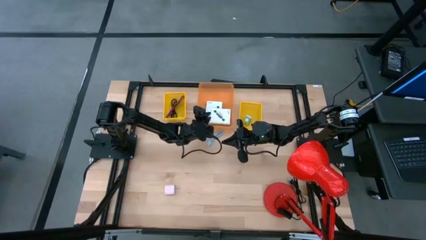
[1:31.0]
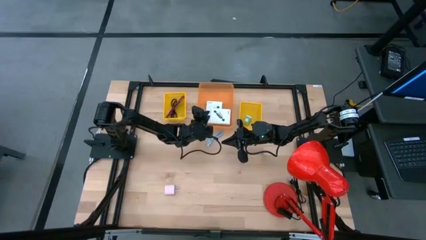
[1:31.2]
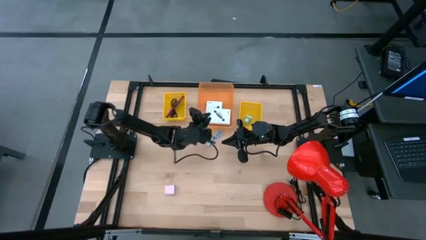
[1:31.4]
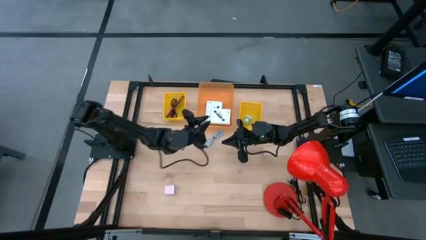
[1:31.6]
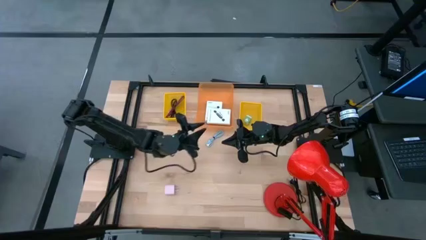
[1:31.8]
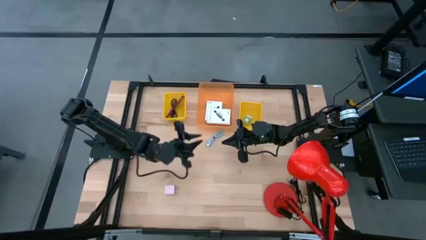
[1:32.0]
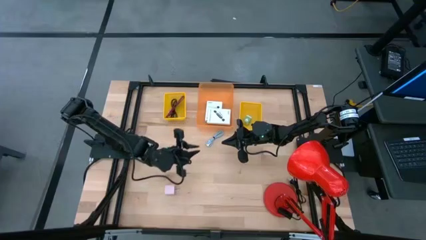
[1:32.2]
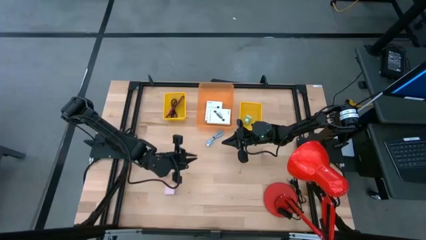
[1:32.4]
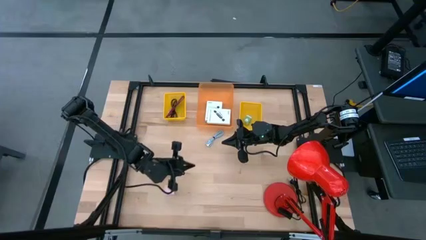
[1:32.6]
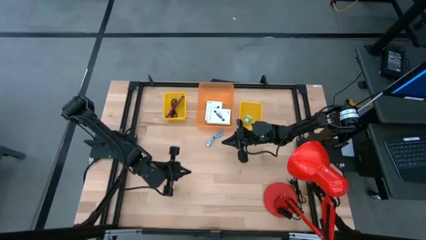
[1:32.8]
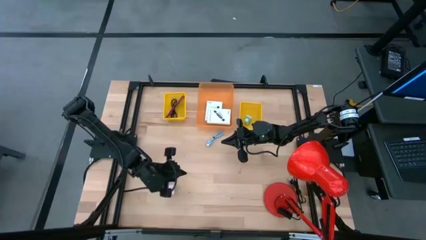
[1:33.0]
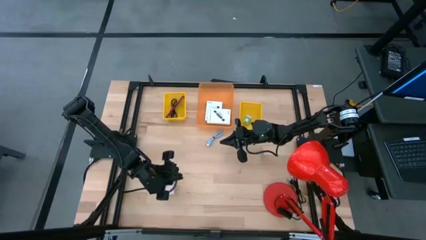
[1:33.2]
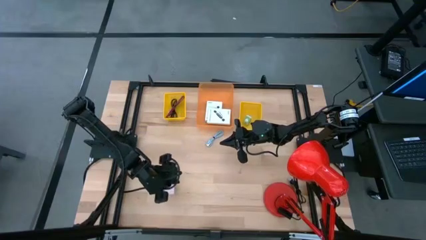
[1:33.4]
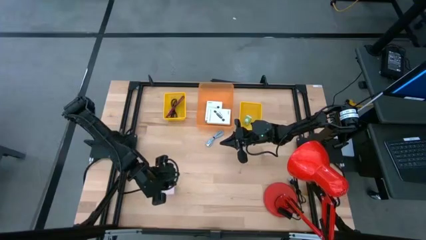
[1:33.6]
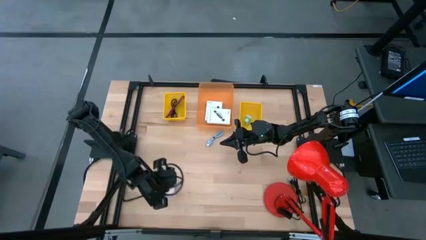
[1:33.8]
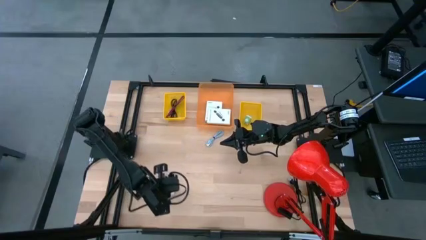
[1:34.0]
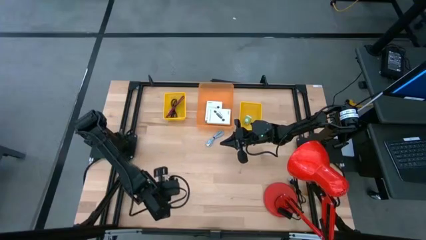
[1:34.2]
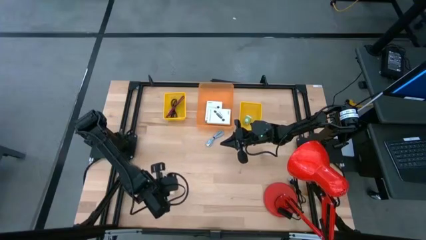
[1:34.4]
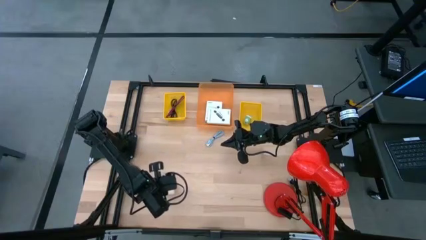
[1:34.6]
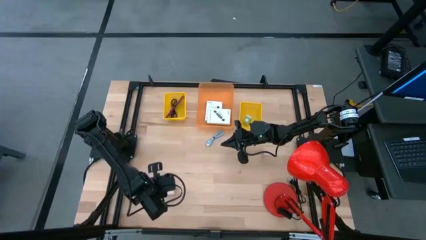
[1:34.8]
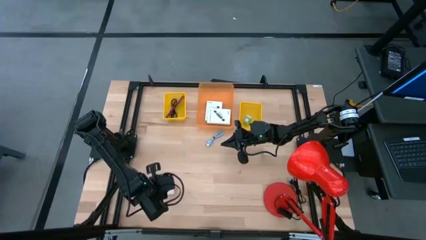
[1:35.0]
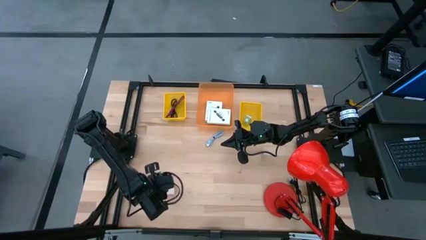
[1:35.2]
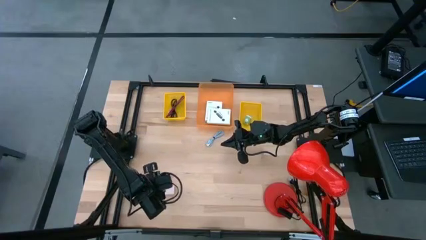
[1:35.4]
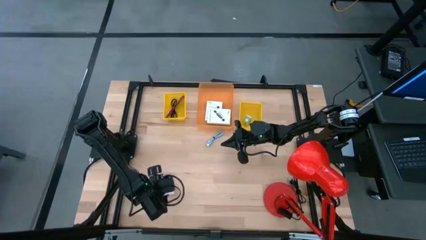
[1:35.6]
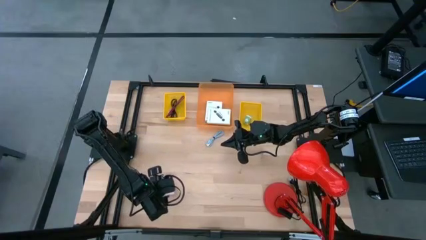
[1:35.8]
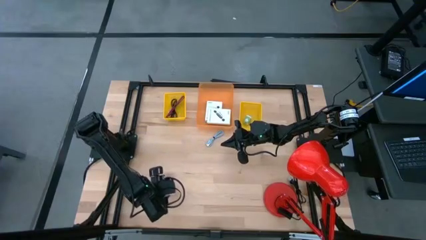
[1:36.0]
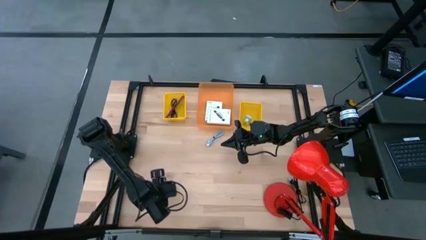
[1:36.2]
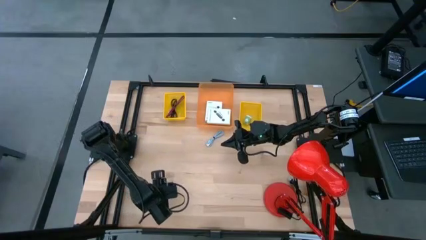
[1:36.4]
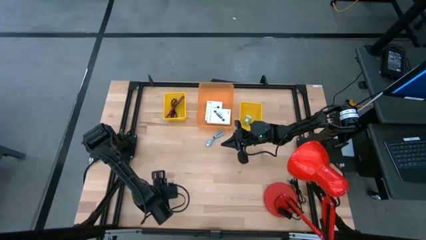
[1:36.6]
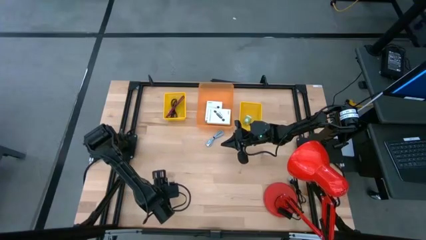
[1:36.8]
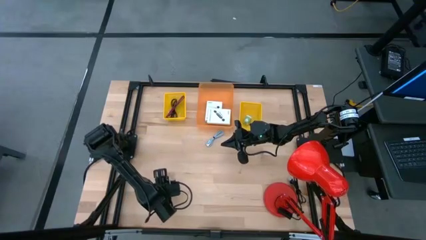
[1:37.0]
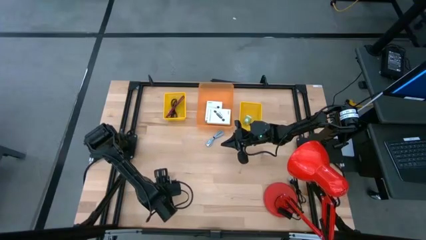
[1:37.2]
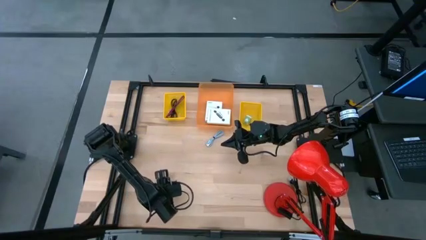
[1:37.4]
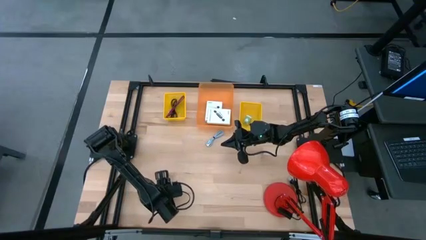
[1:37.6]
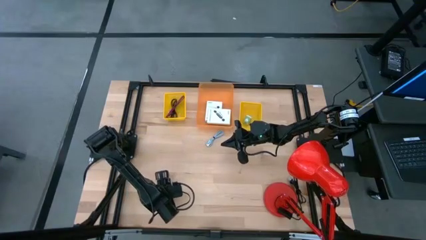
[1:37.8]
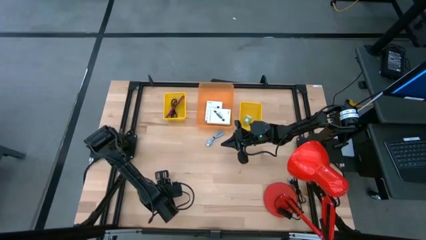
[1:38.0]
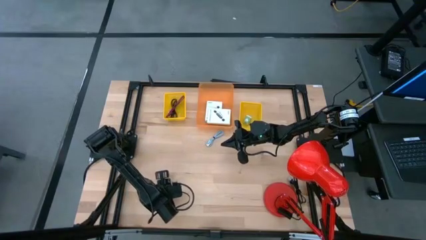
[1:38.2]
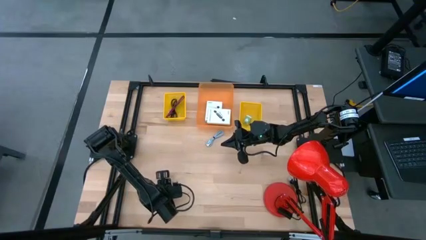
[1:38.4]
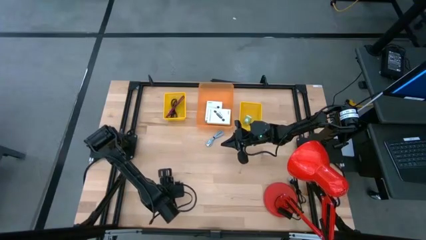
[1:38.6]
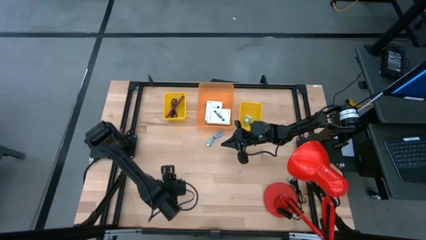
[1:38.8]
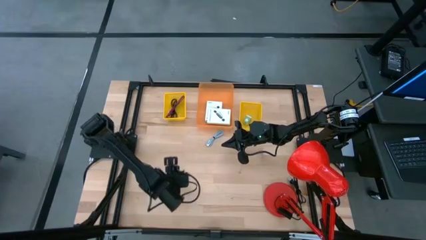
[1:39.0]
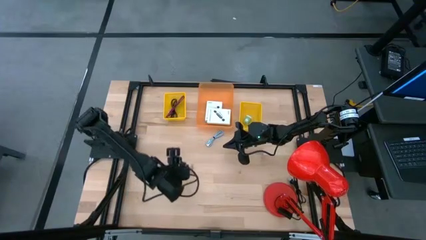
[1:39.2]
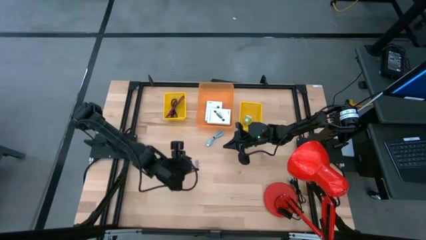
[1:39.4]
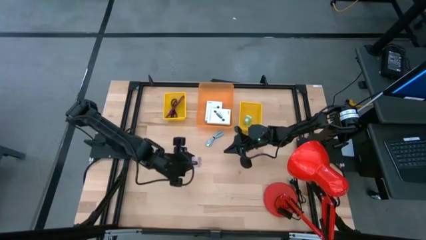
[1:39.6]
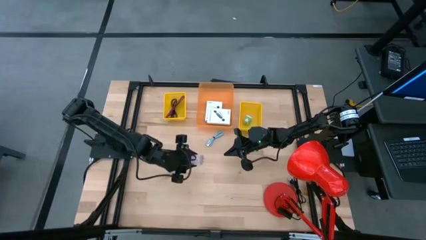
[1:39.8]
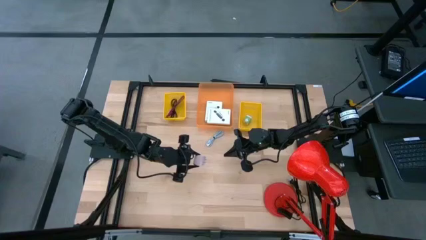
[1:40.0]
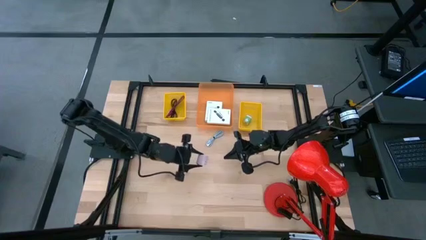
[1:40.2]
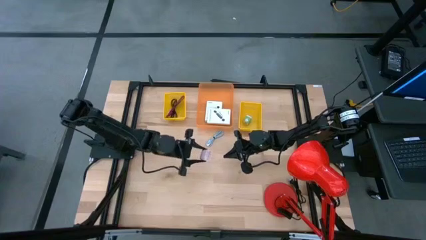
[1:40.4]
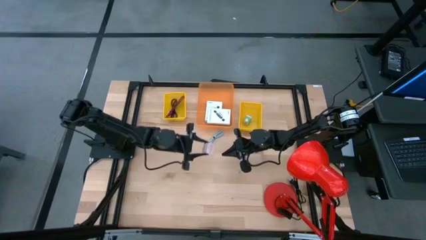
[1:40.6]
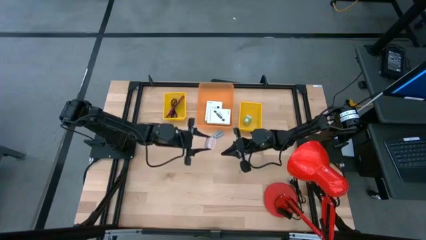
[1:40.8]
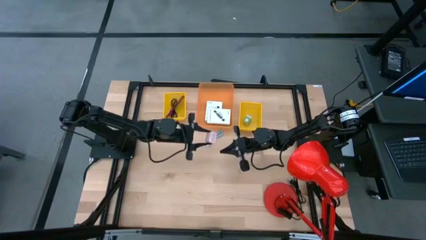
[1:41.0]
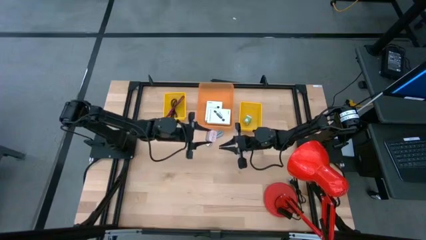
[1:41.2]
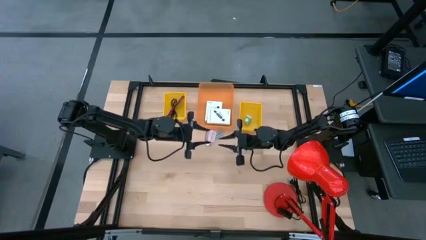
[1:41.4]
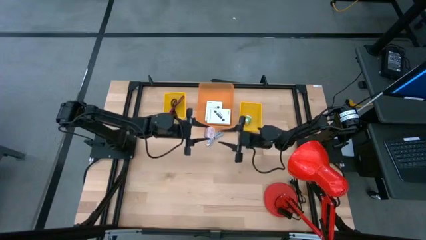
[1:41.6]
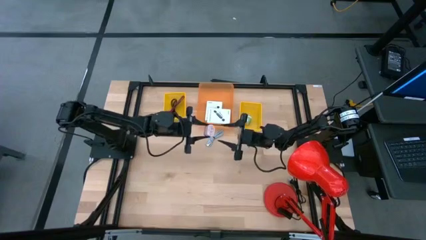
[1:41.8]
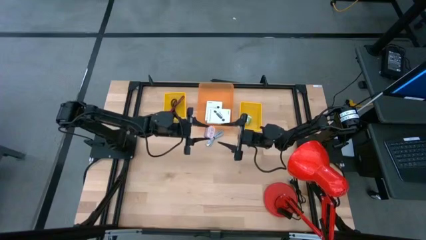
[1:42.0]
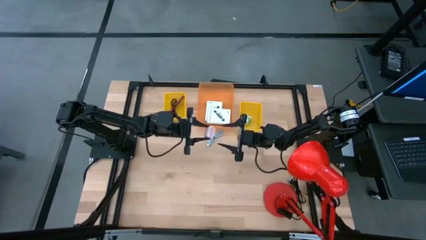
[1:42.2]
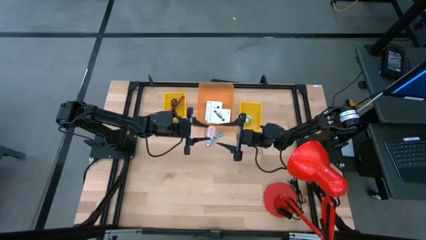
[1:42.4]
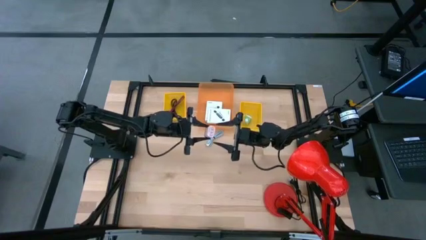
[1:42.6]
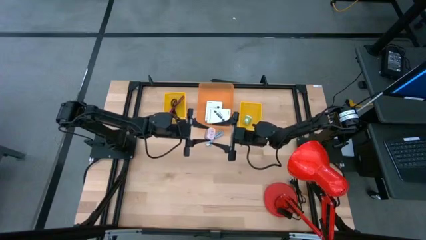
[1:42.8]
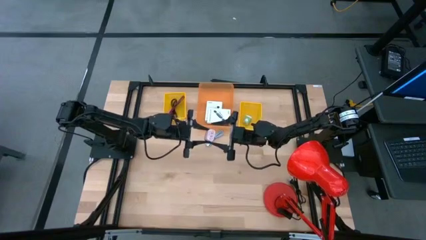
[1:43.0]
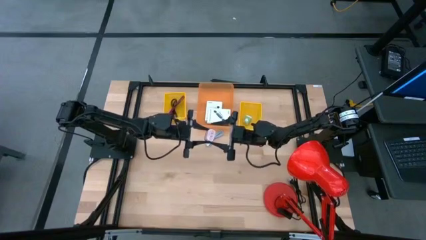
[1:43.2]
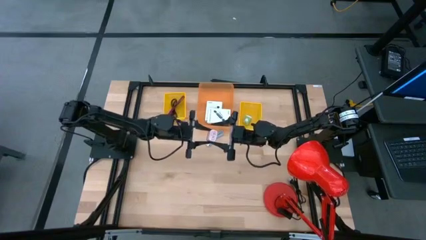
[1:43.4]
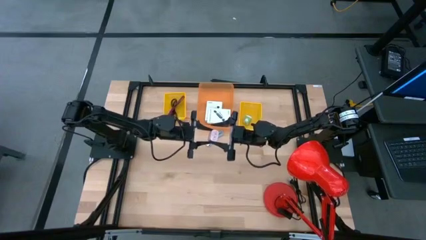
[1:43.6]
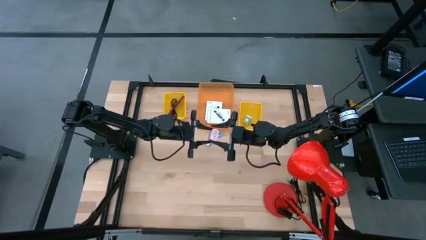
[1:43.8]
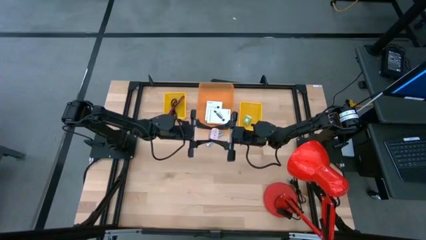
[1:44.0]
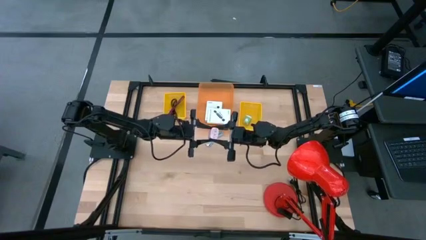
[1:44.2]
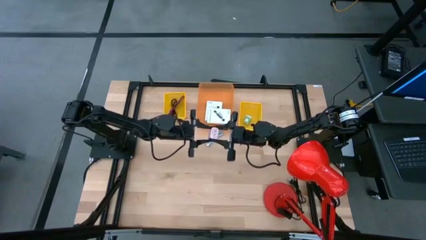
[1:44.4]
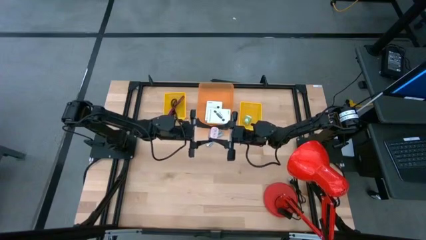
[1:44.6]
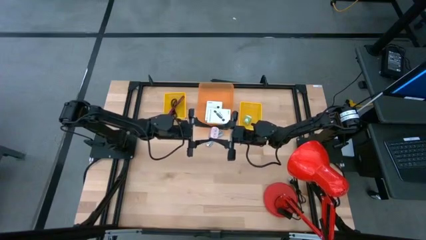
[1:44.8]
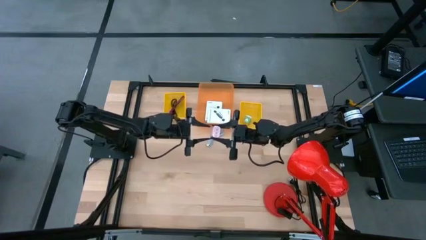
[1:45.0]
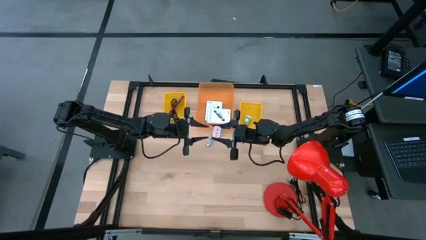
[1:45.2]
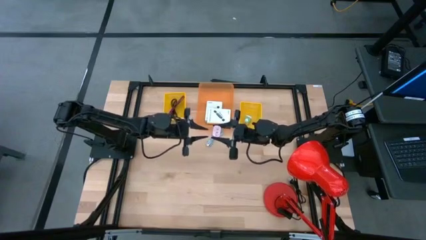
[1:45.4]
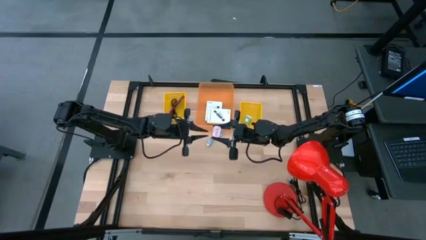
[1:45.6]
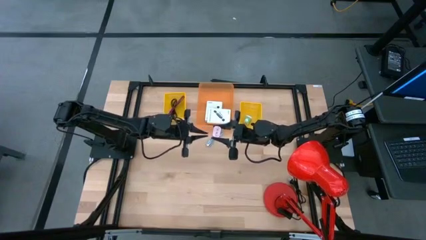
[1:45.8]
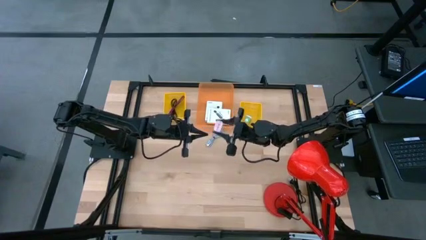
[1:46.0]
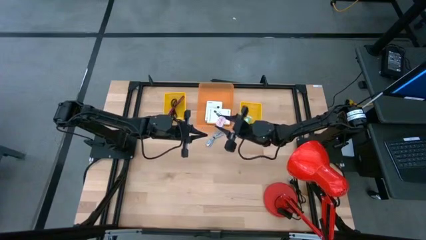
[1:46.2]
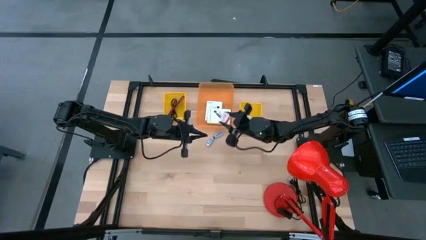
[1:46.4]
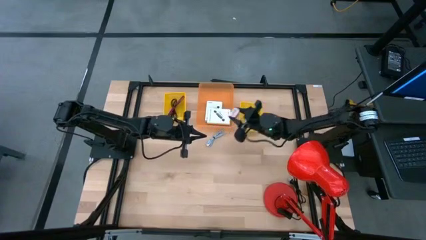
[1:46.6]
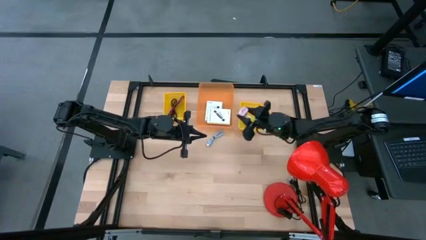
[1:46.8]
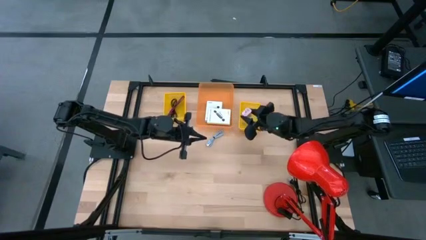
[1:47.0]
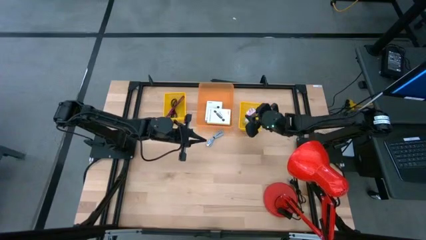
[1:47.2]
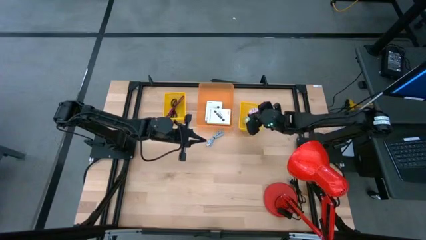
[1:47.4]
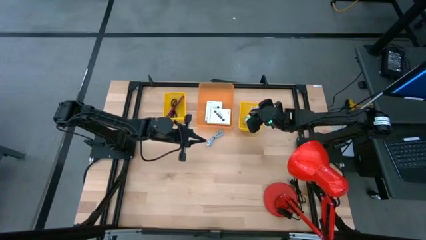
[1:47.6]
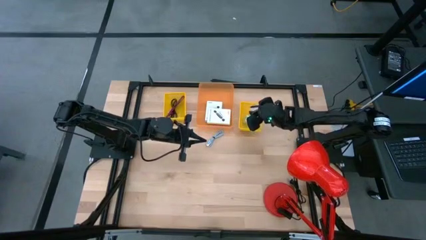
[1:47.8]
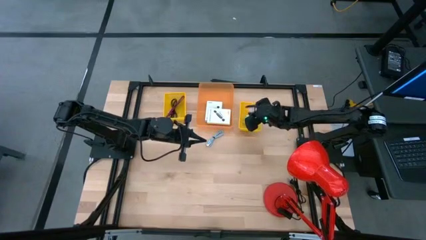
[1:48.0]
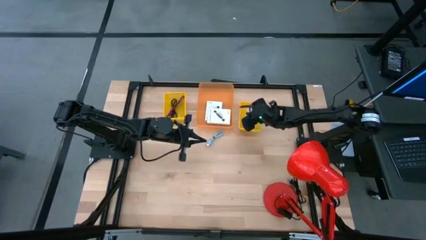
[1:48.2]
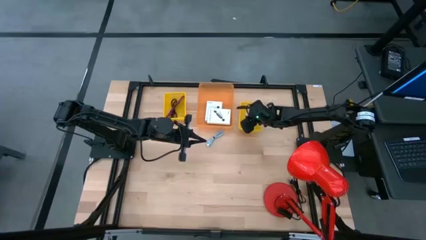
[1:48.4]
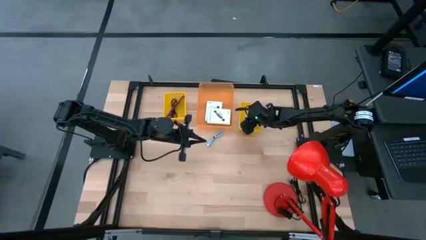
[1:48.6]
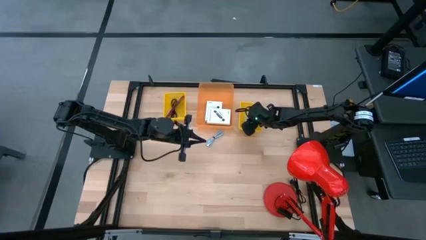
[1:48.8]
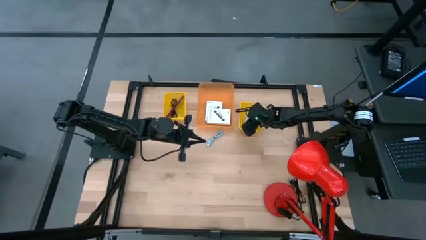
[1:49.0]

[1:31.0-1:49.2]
Task: Pick and place items into bin
Put the pink charger adapter into the right yellow bin
